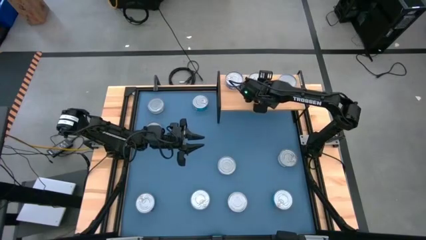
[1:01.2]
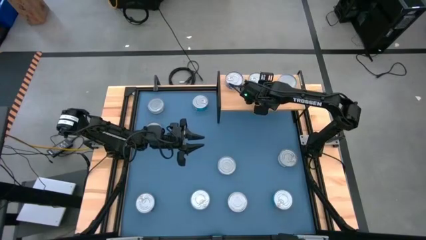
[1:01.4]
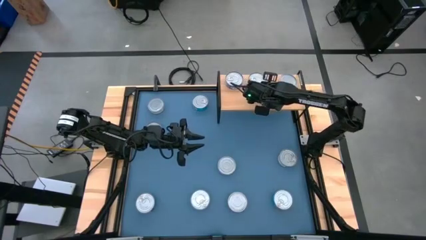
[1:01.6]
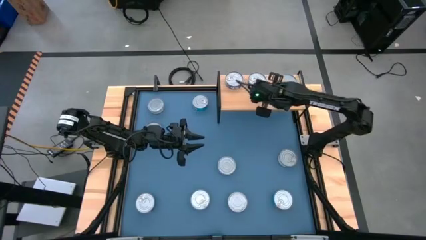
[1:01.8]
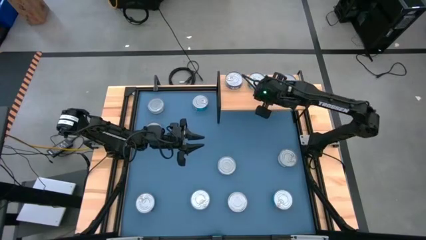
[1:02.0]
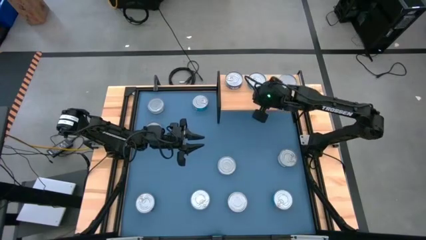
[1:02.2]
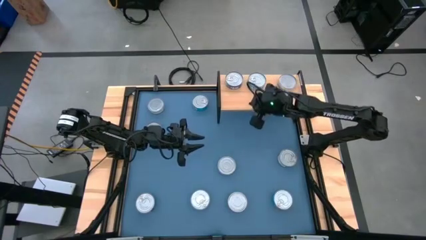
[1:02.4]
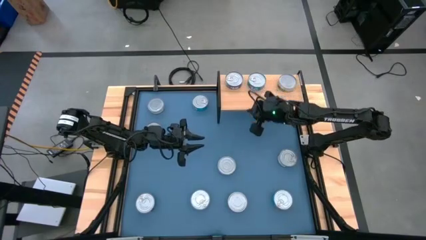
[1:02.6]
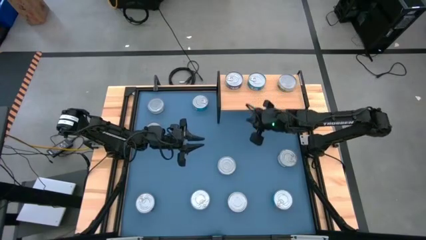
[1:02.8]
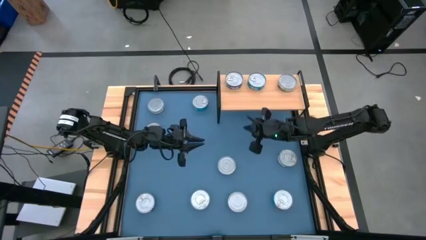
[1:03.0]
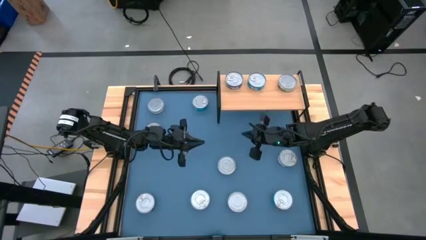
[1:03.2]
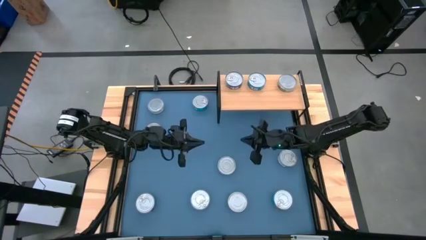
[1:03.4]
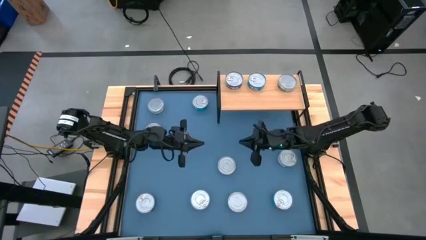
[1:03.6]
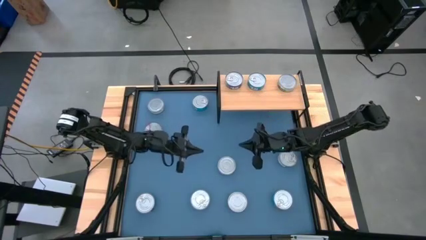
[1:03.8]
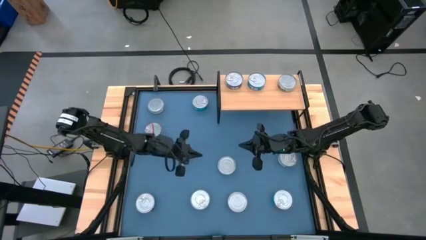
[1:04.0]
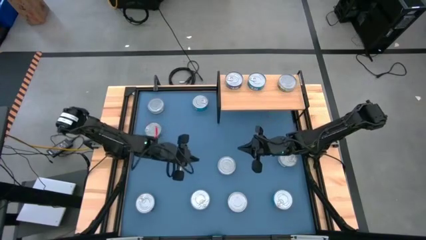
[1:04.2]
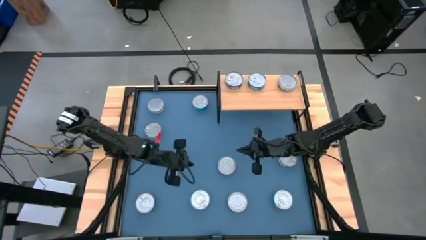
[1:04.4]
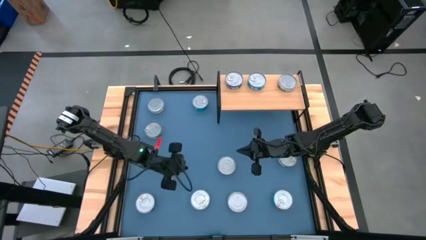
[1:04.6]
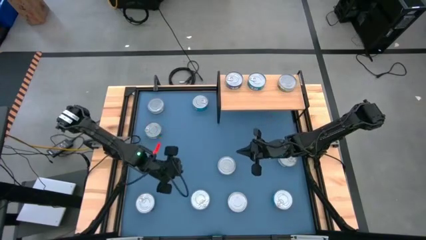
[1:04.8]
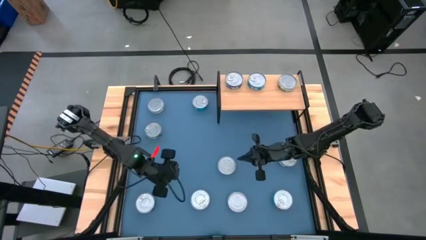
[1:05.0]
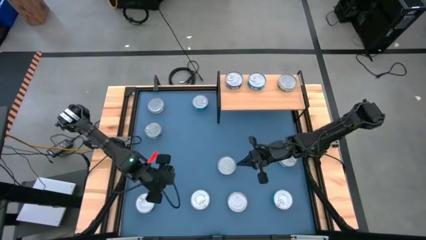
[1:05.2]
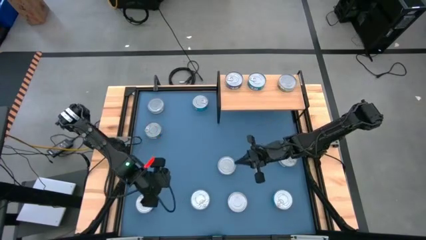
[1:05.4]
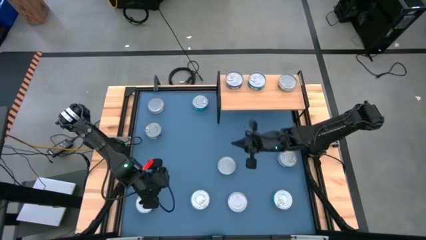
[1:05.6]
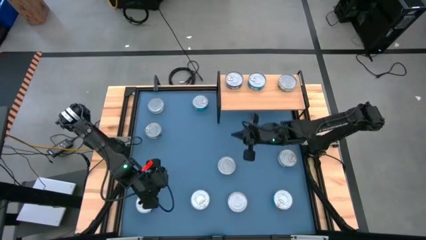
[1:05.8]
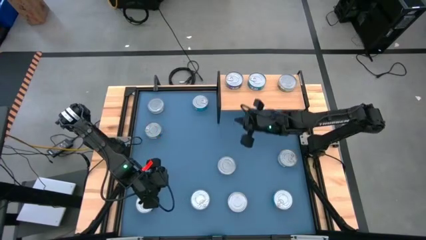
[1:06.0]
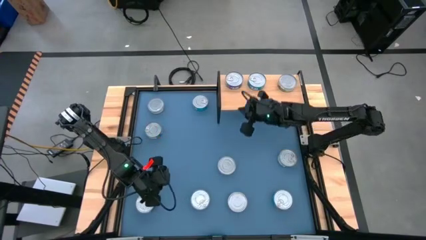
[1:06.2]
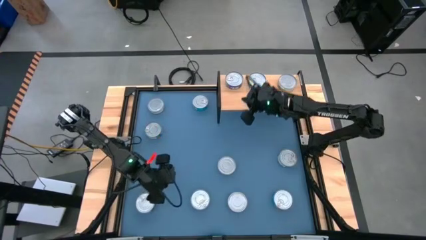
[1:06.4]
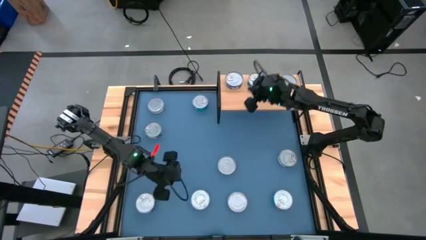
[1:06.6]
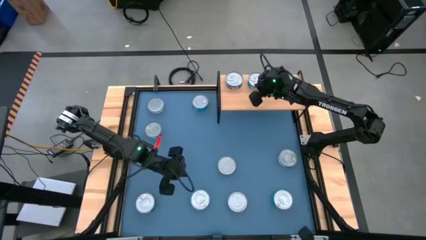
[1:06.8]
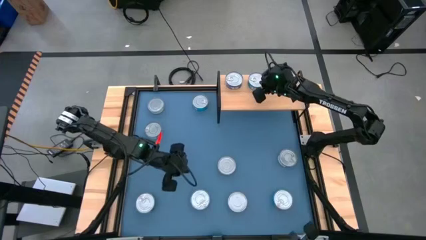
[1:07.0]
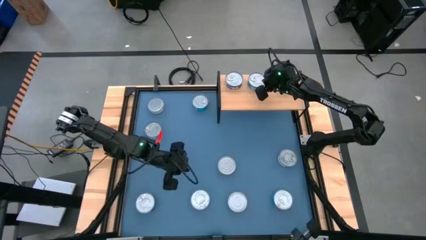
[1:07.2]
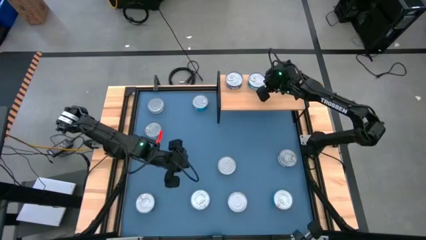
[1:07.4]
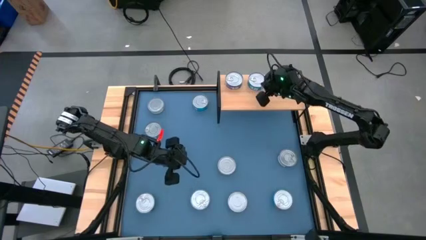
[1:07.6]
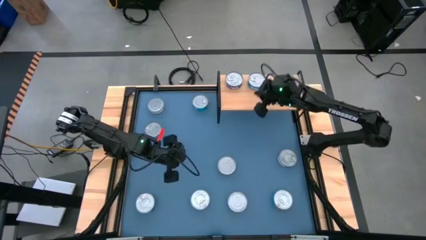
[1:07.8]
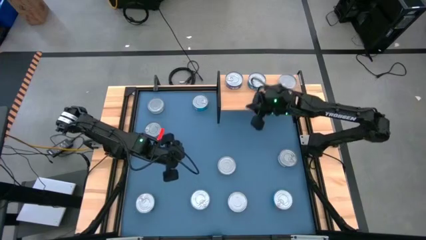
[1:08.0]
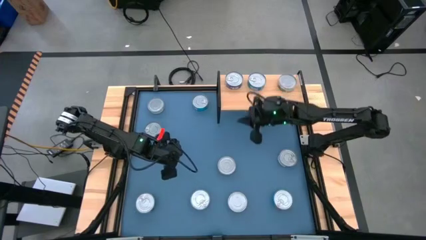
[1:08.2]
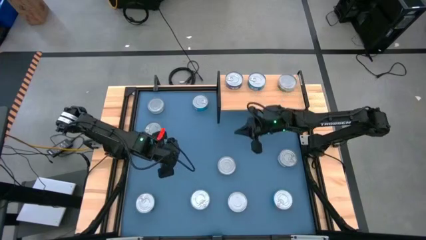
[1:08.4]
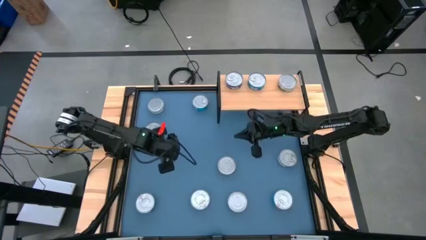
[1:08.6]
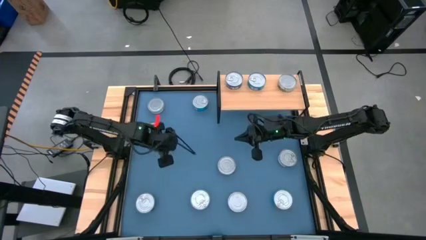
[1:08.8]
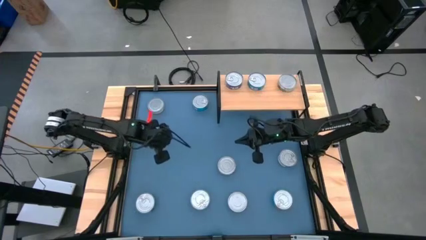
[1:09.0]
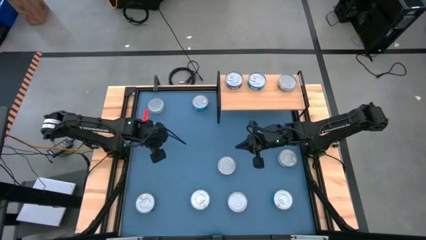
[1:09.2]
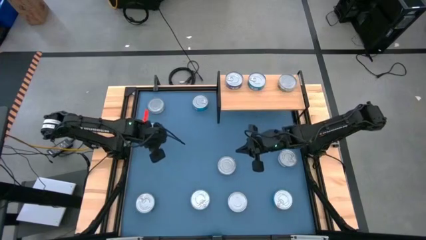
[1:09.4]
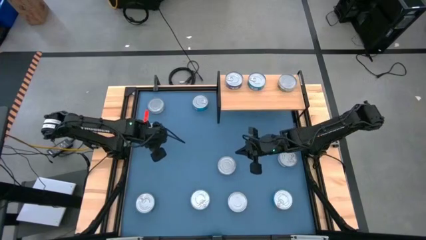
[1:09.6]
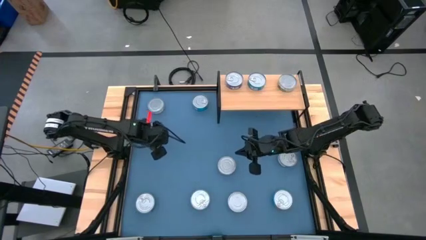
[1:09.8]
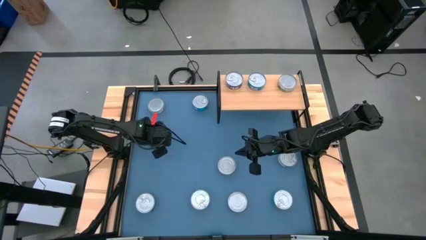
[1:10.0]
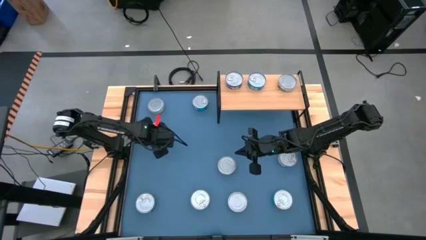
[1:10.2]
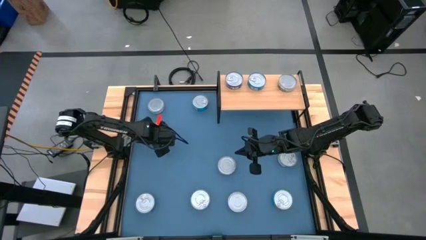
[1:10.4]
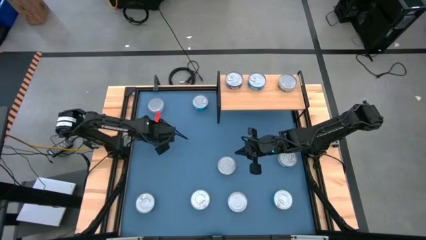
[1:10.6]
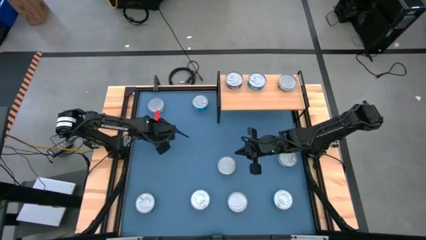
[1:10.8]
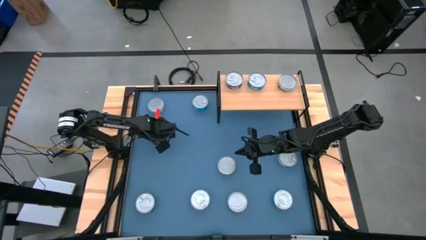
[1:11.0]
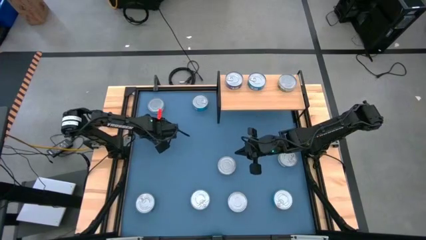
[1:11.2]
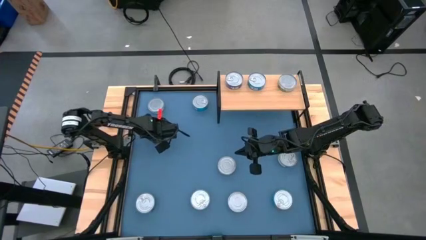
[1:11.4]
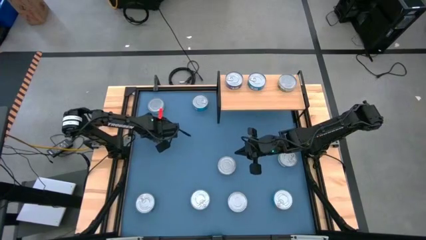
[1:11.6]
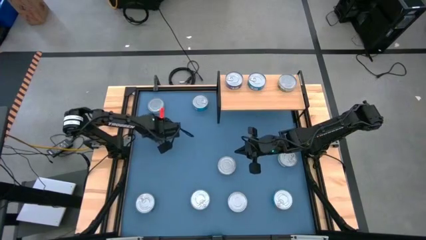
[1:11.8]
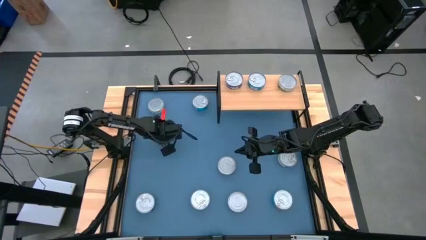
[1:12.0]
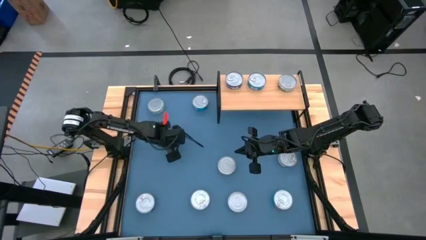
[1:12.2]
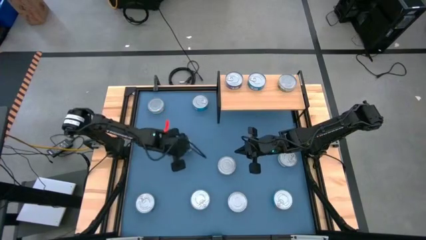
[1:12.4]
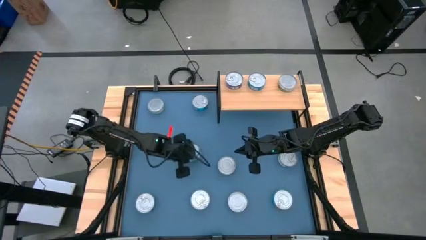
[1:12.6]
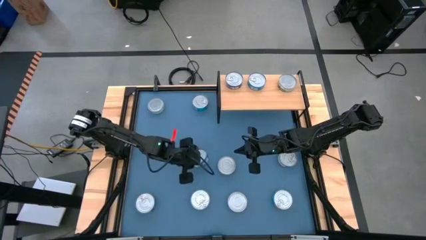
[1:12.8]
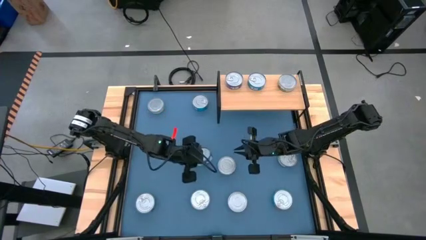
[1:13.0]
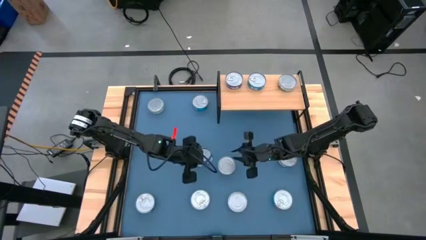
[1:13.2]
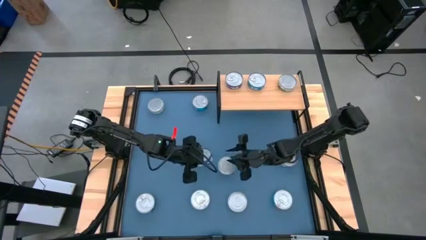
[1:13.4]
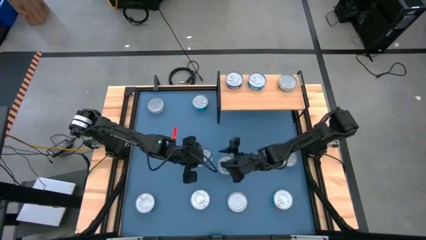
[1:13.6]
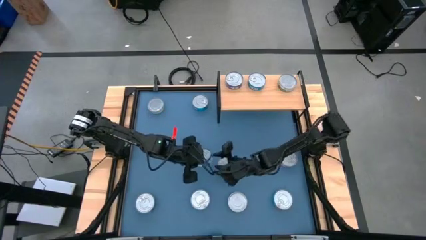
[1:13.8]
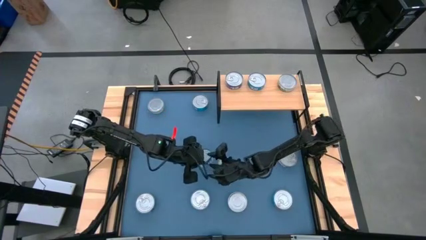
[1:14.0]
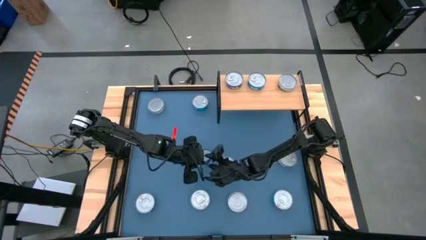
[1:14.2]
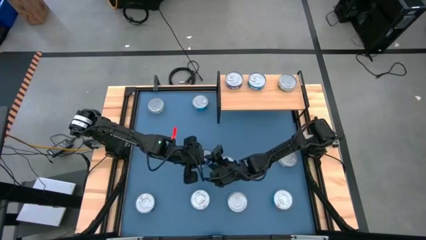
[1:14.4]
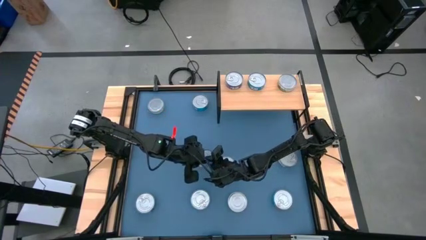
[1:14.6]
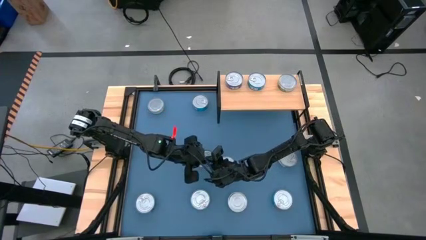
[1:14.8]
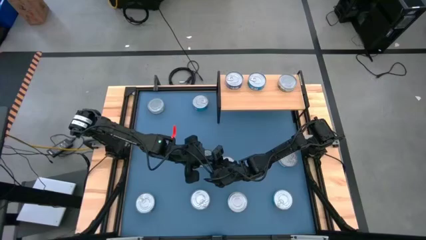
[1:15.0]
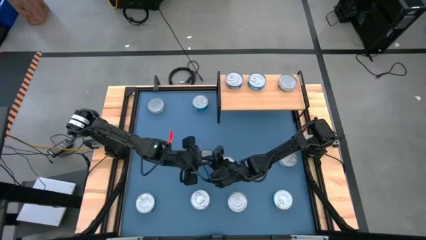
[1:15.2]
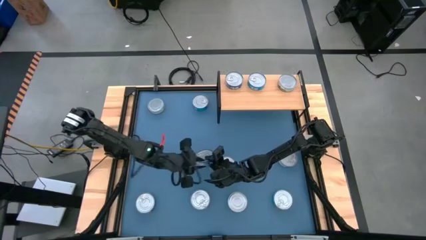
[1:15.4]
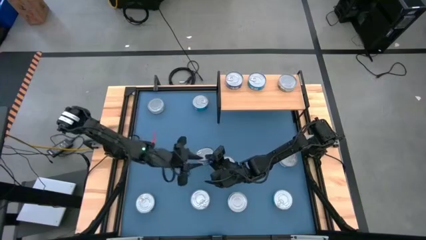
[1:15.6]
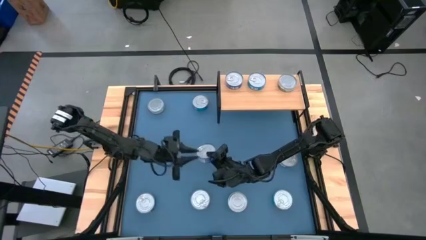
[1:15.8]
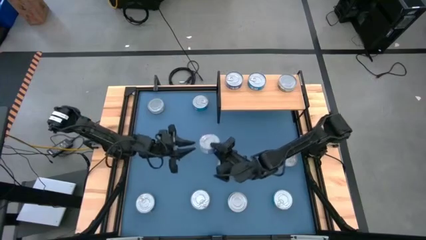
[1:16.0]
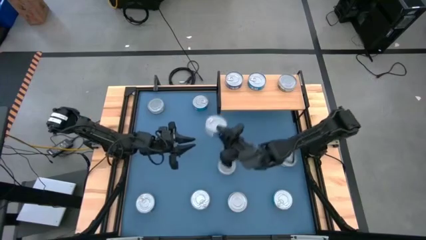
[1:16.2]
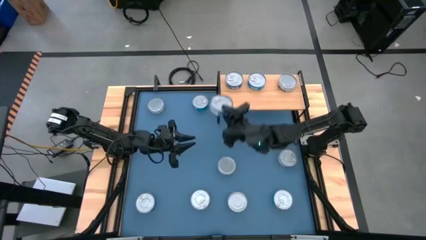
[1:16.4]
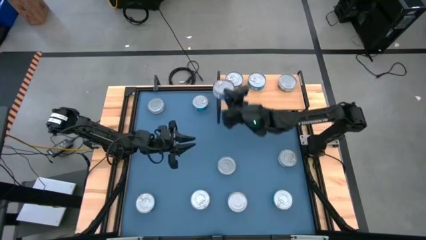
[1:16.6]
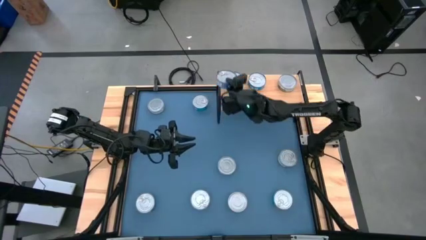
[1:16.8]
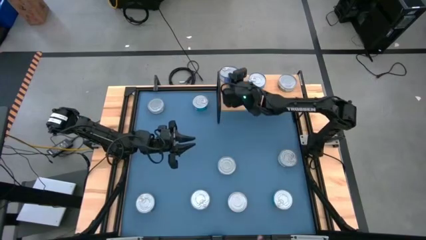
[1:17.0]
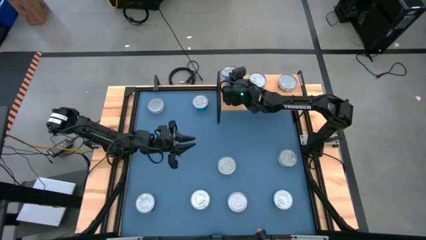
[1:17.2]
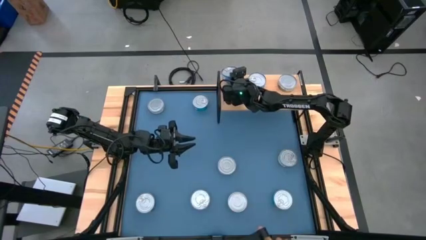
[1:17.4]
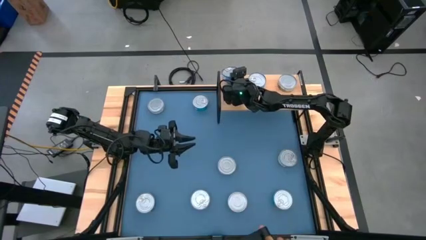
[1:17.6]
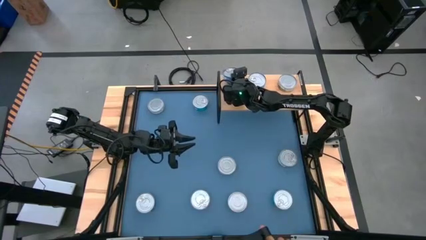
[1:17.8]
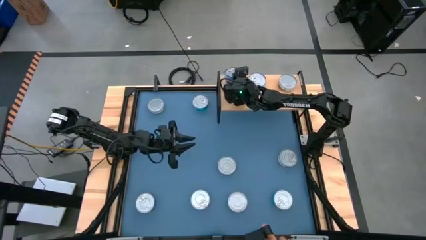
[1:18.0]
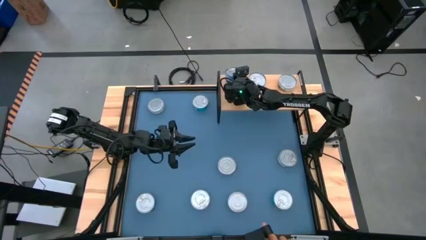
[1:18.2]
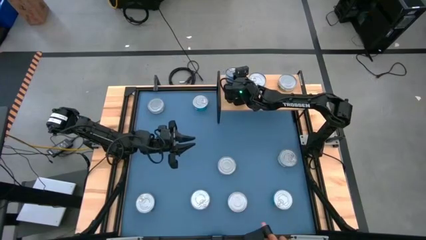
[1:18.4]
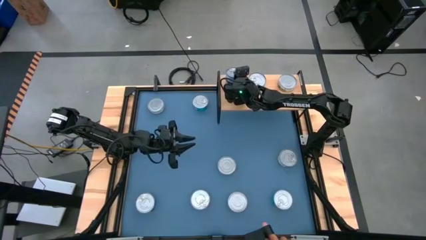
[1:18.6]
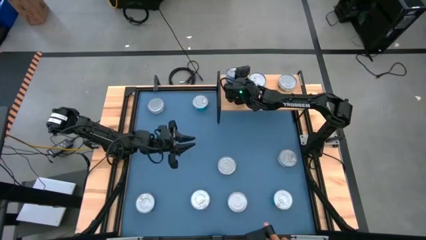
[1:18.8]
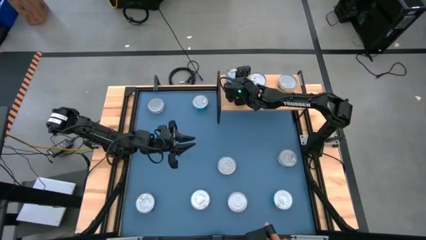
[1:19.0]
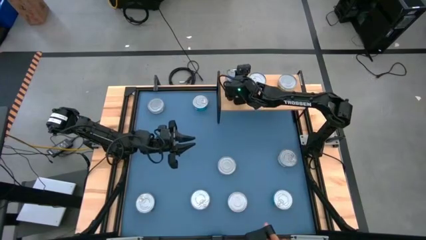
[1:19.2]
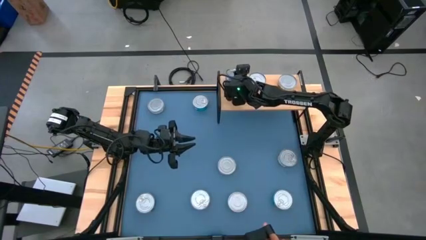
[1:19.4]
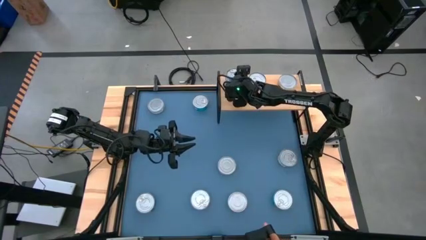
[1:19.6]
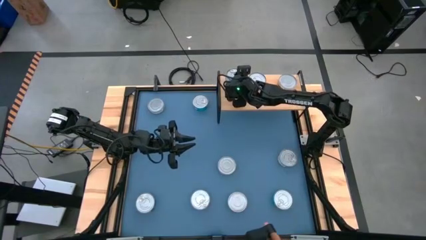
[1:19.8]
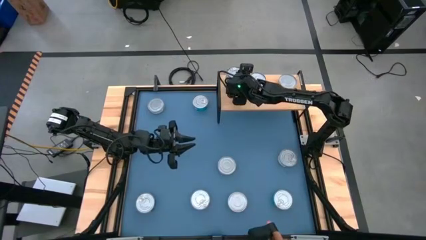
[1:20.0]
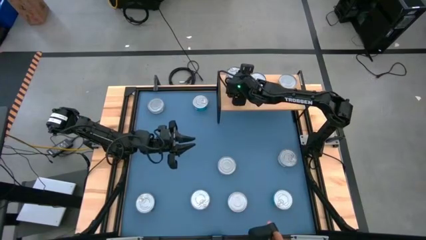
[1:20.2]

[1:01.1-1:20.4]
Task: Stack canned seafood by type on shelf
Stack the top left blue tuna can on top of the blue tuna can on the shelf
